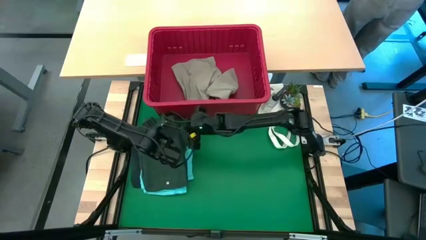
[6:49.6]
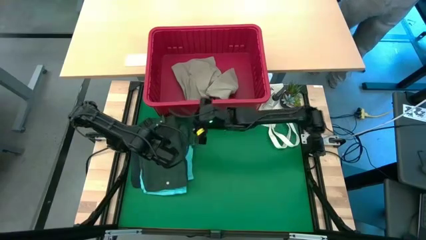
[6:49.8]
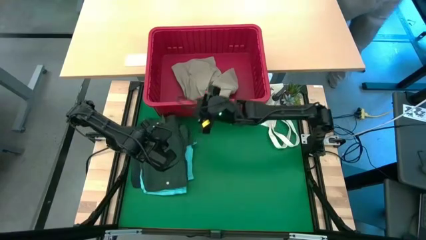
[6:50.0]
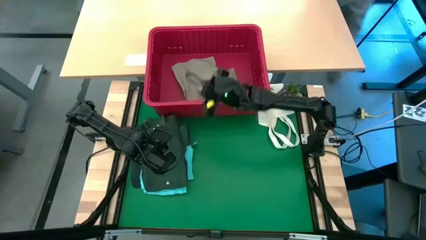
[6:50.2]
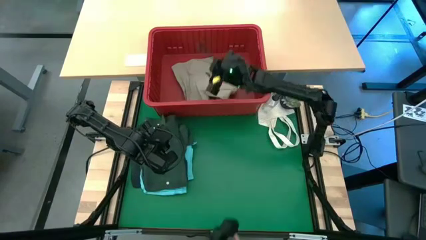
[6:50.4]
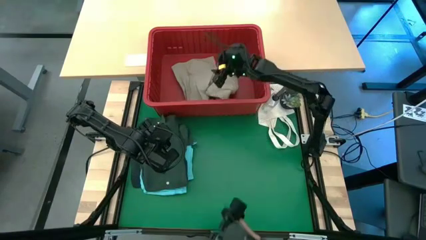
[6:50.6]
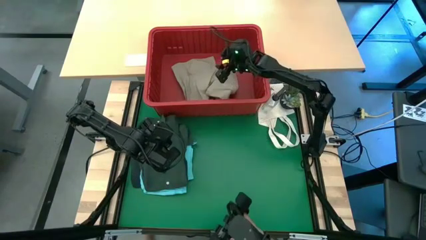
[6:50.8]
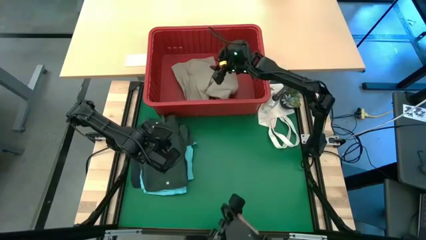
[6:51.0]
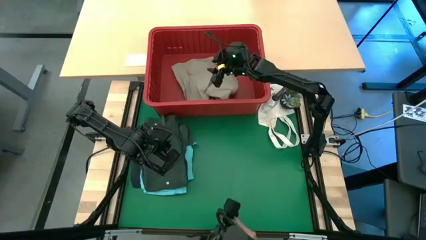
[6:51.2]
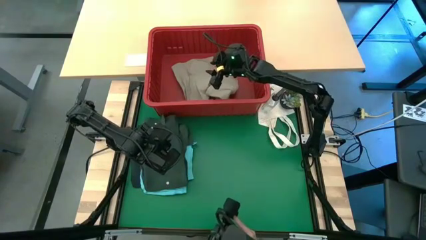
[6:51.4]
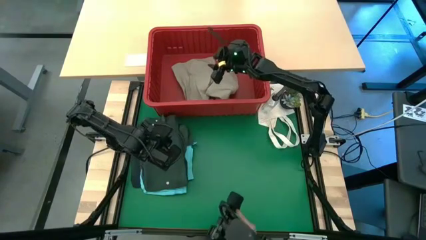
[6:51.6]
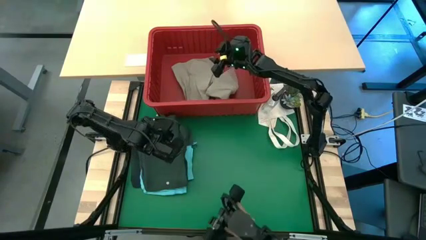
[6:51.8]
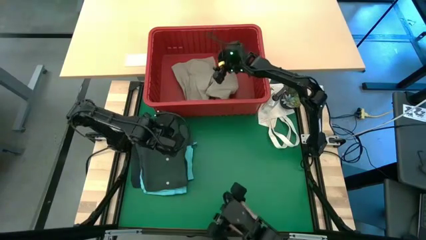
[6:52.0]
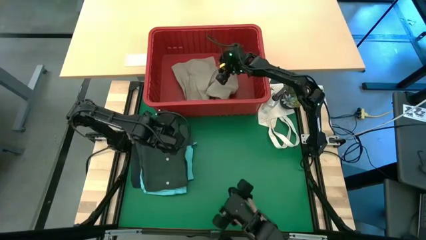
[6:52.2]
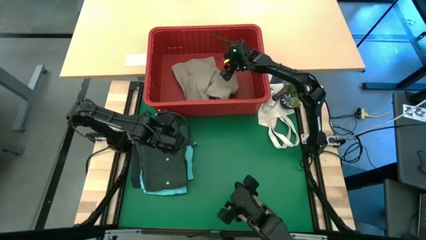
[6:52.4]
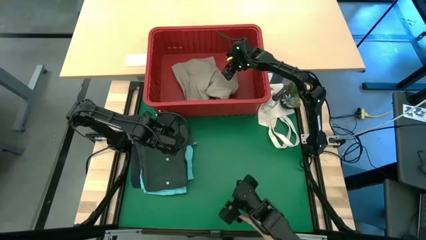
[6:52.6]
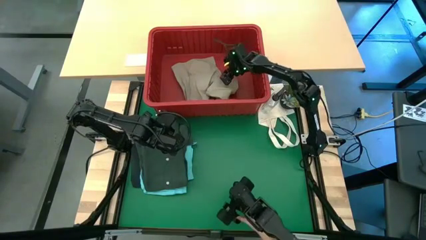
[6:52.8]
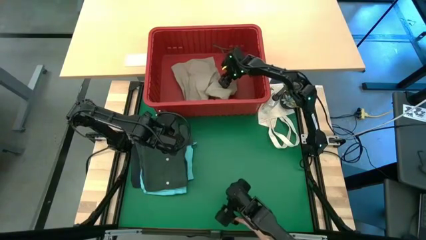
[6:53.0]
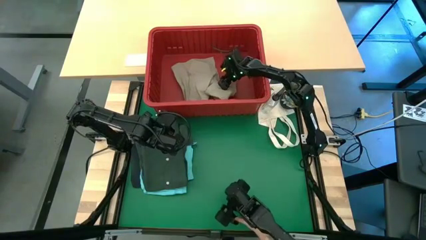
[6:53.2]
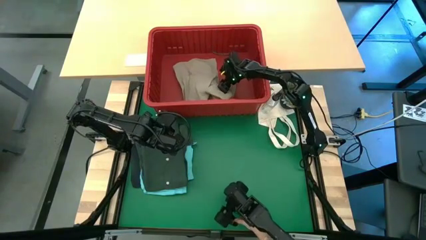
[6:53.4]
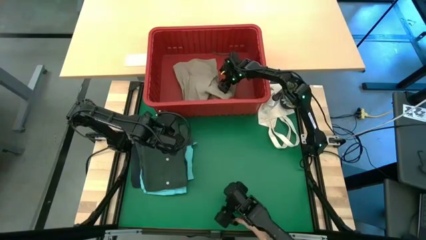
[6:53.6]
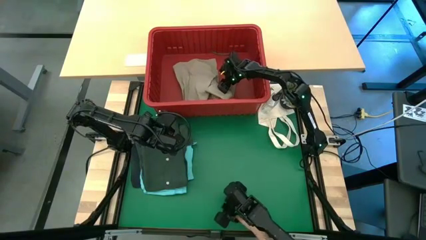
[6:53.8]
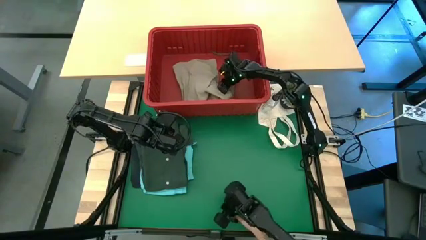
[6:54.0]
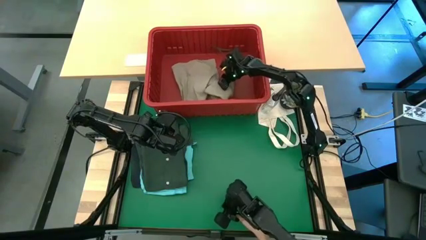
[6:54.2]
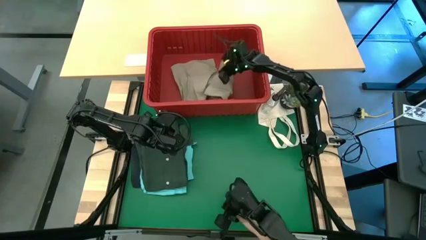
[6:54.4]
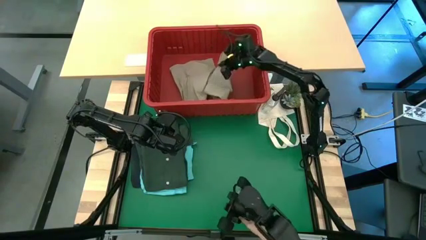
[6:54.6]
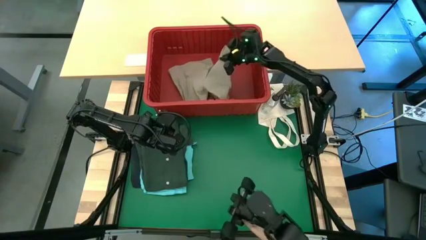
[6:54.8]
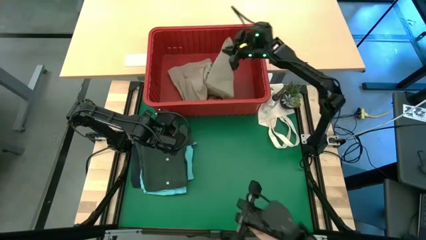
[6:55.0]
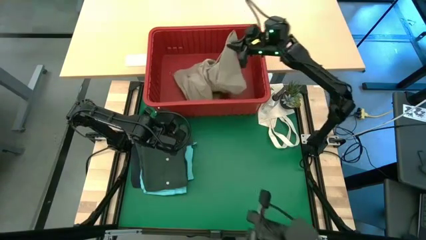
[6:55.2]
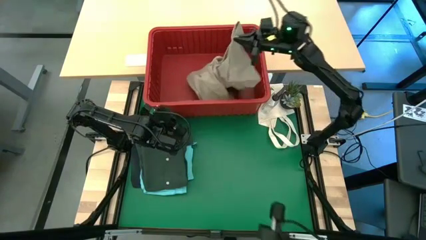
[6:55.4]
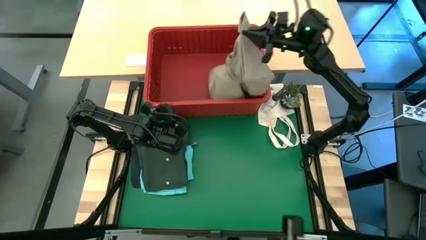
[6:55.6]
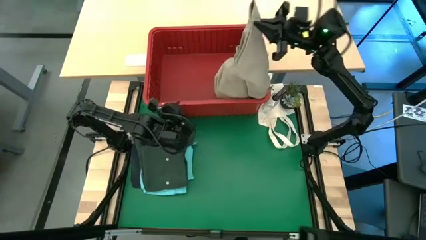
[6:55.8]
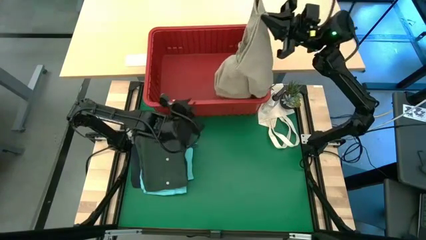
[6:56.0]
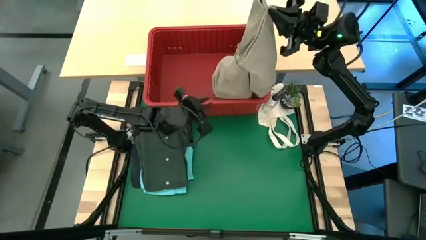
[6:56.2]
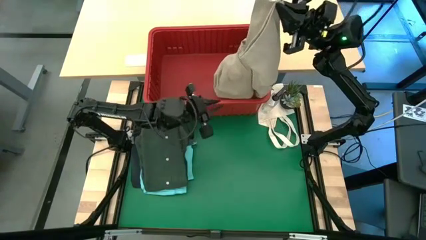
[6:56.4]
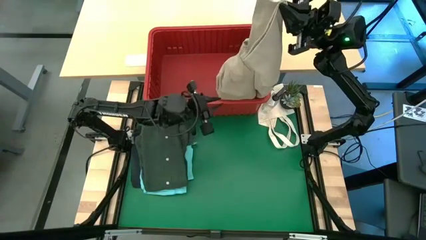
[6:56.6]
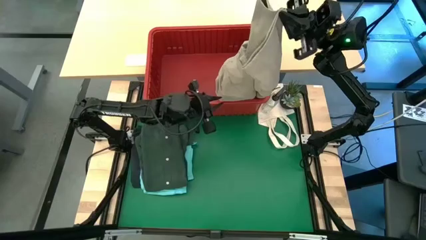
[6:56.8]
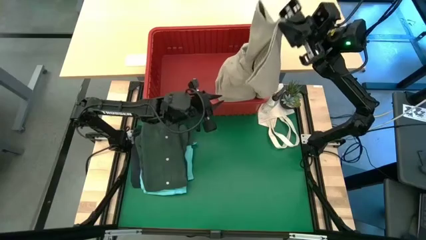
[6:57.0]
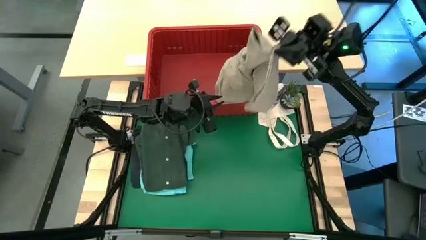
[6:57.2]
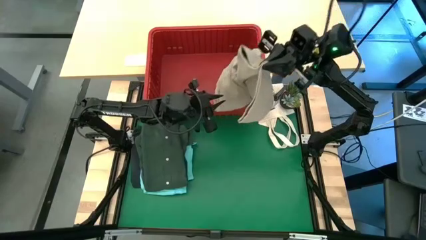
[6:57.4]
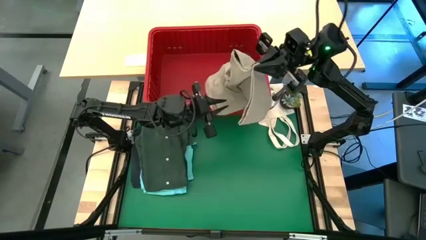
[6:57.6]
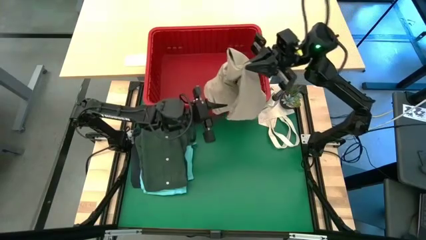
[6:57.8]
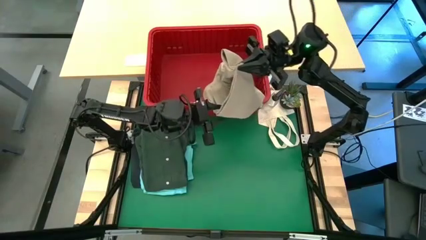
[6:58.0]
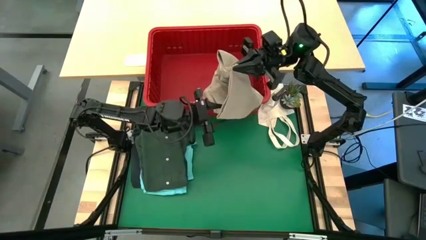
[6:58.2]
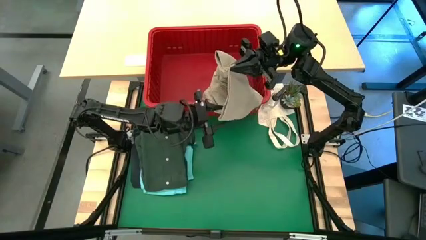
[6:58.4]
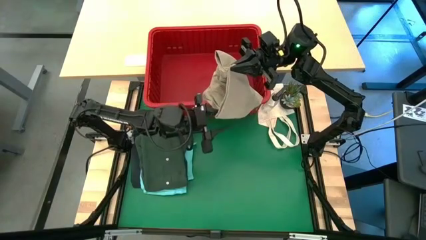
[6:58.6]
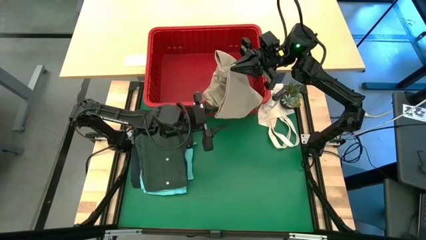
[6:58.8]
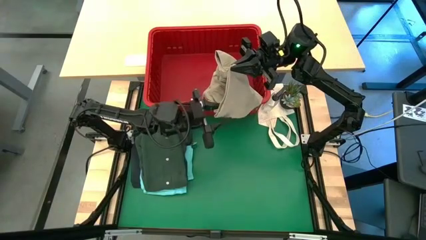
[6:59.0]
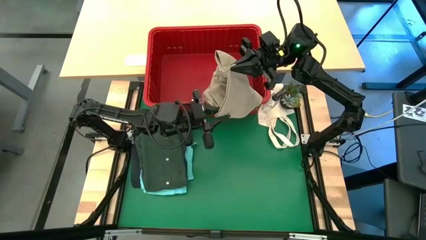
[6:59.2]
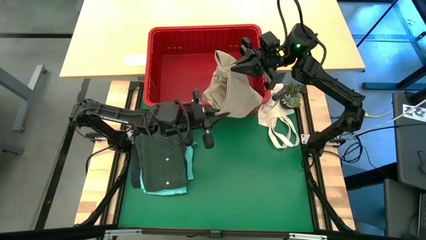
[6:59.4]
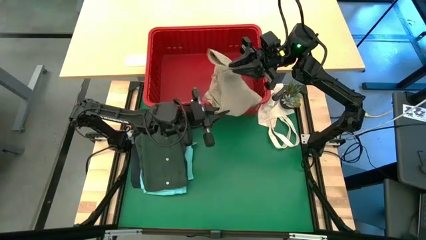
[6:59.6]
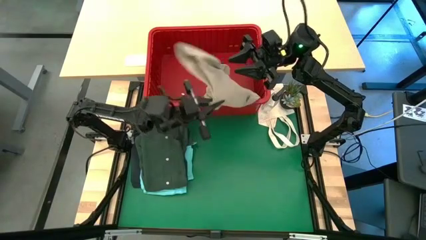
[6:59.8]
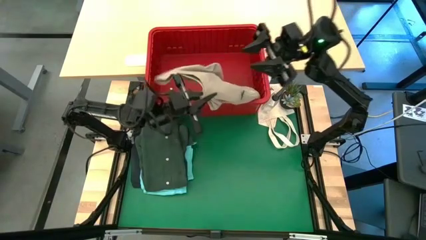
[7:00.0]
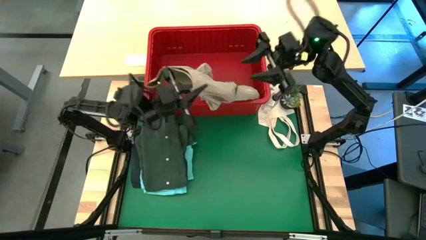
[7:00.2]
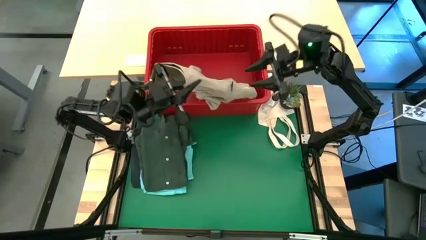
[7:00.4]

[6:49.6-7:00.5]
Task: Fold Laundry from Bin
Fold the brown shorts from the red laundry bin

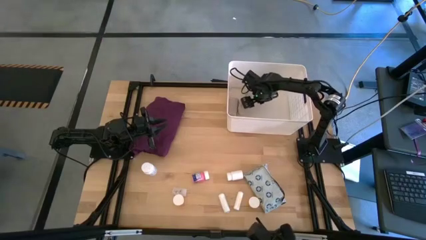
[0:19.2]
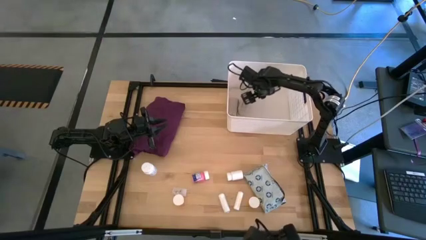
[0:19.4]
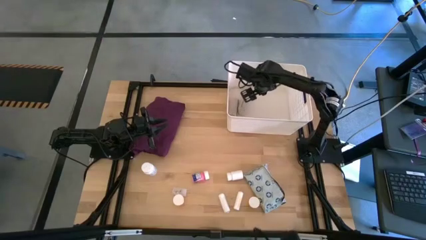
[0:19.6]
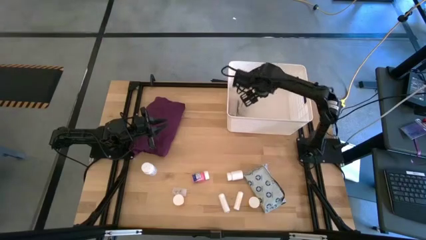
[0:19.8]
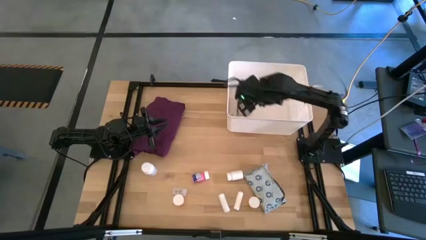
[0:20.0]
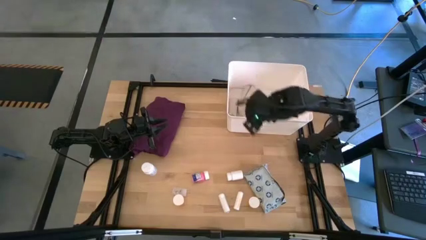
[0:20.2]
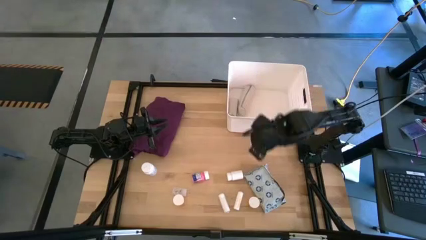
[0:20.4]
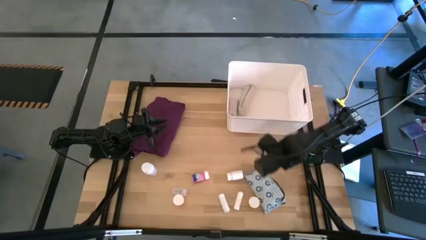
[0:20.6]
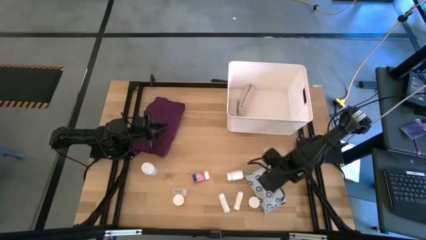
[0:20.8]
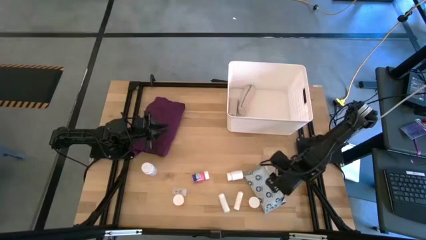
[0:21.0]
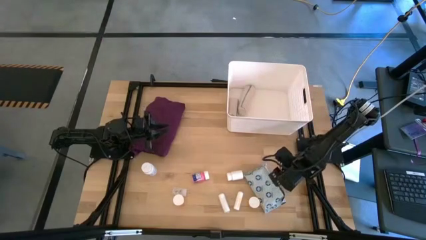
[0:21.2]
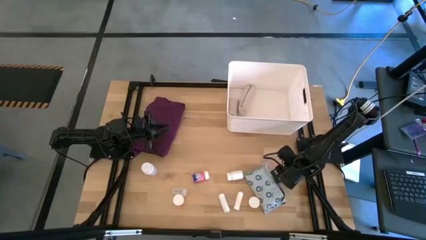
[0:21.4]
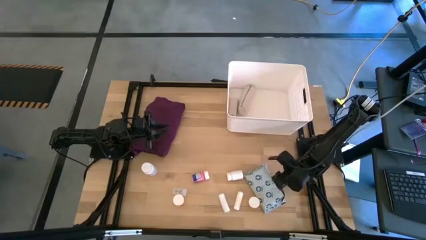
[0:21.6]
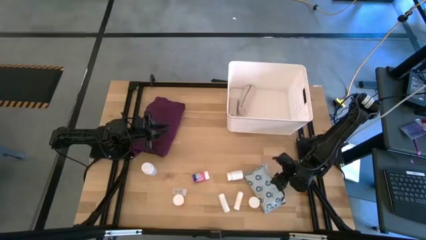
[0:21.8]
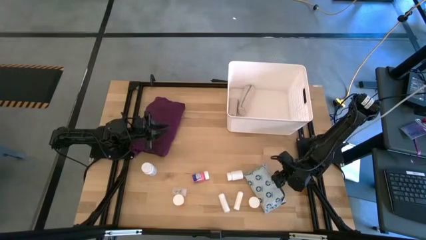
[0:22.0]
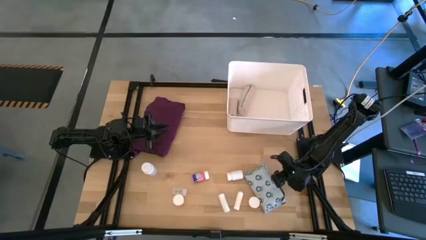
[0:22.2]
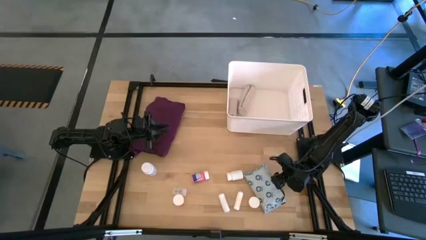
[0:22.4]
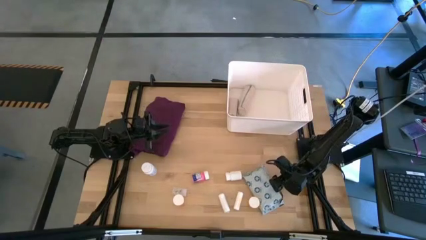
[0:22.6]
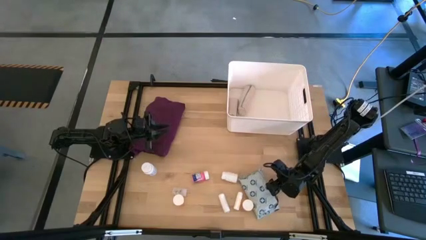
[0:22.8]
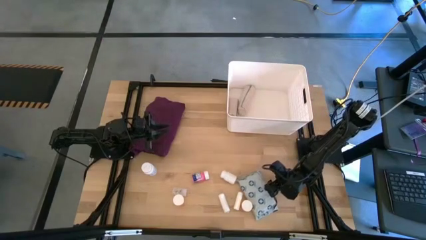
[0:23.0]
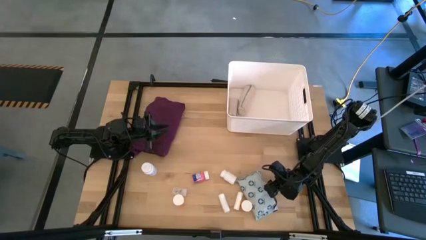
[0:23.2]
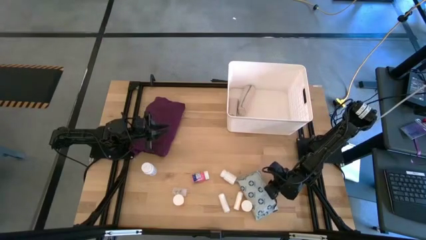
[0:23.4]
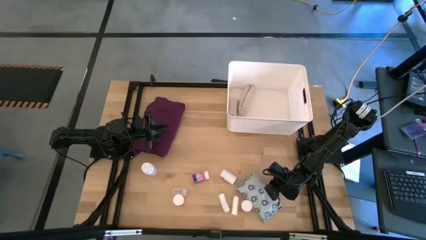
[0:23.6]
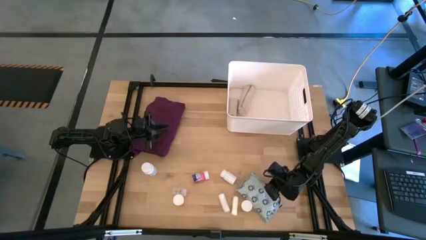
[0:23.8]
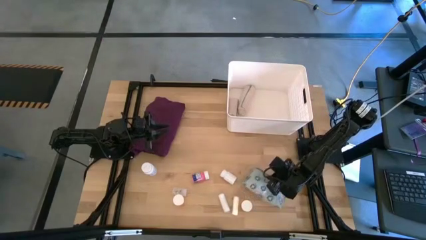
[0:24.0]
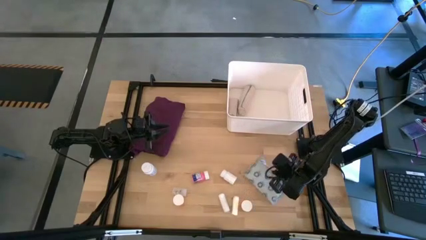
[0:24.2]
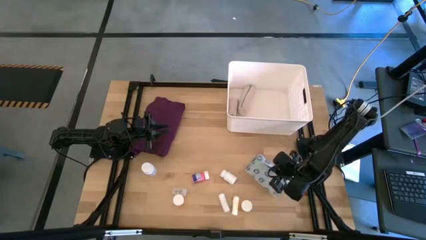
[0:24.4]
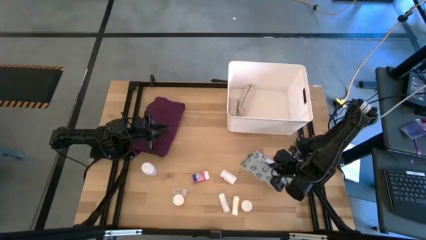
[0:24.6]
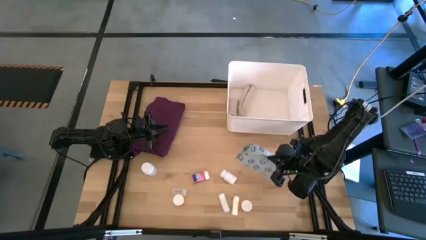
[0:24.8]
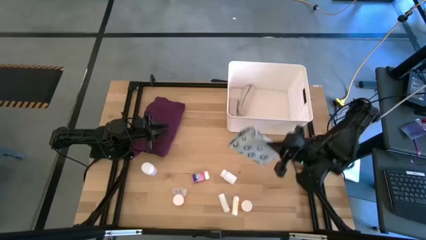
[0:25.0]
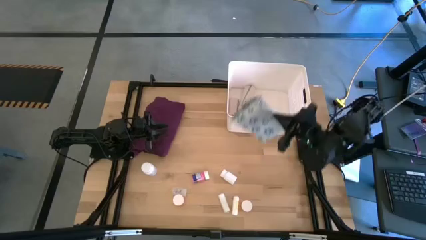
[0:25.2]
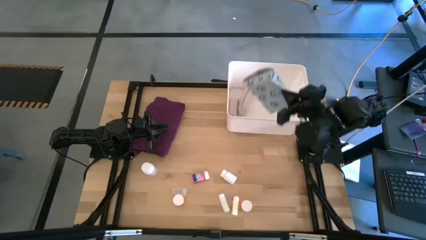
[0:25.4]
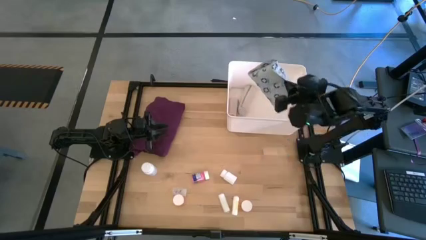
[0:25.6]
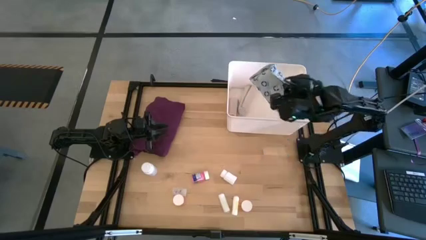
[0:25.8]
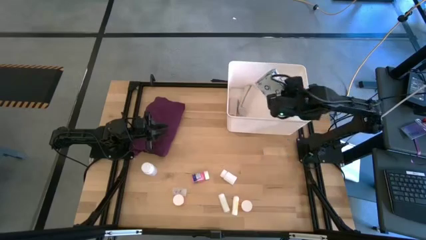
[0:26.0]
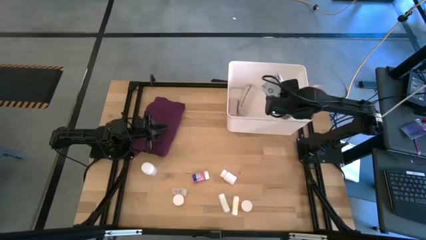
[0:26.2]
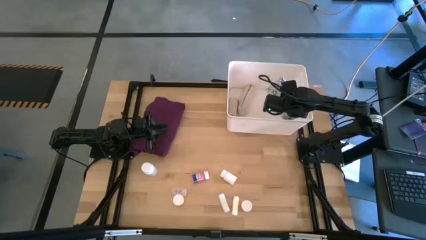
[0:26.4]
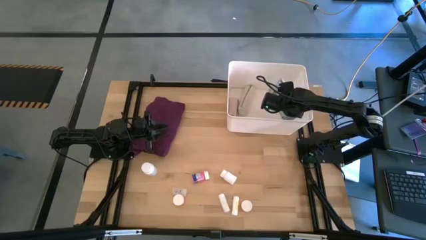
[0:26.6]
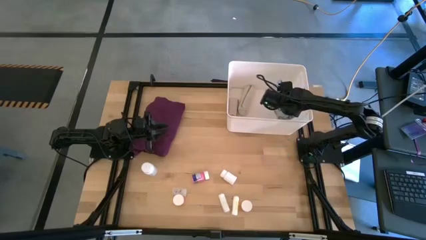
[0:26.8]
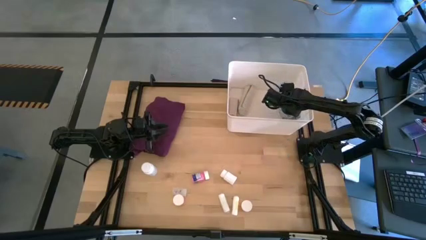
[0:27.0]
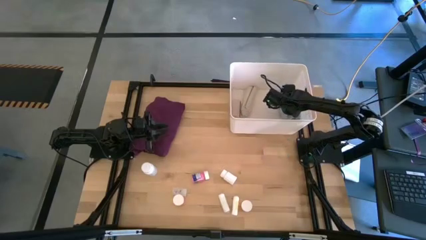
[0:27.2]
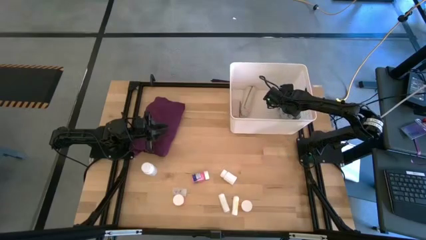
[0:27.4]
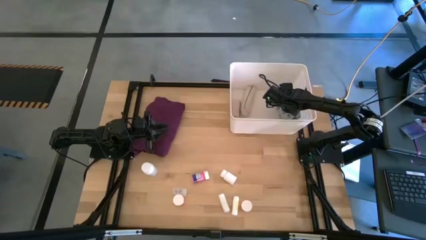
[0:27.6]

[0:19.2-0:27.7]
Task: Pick & place medical supplies in basket/bin
Put the white mailer bag into the white bin
